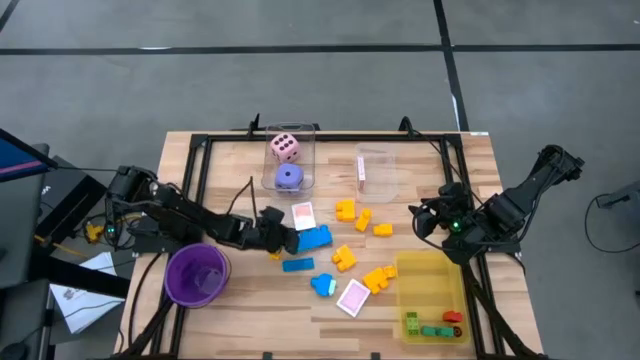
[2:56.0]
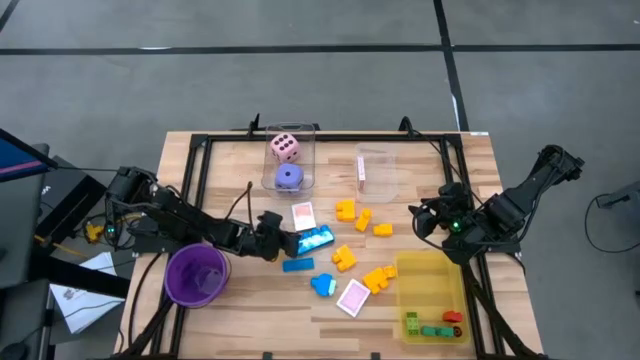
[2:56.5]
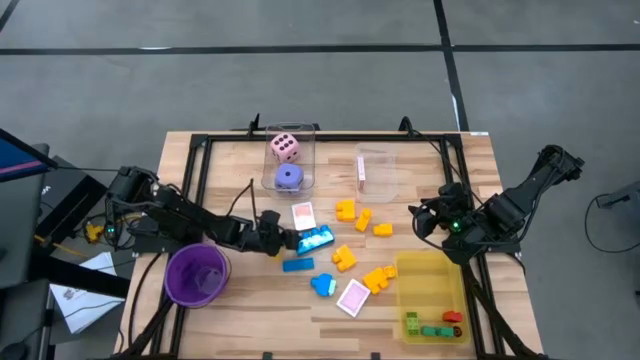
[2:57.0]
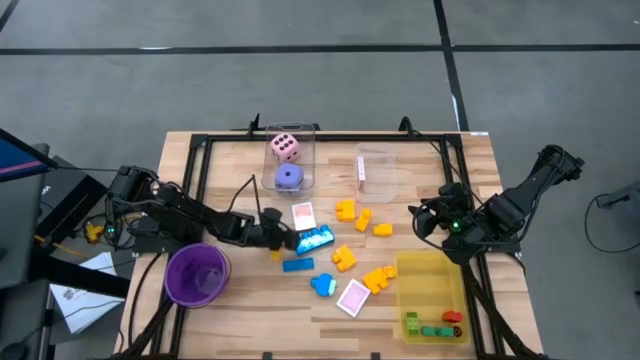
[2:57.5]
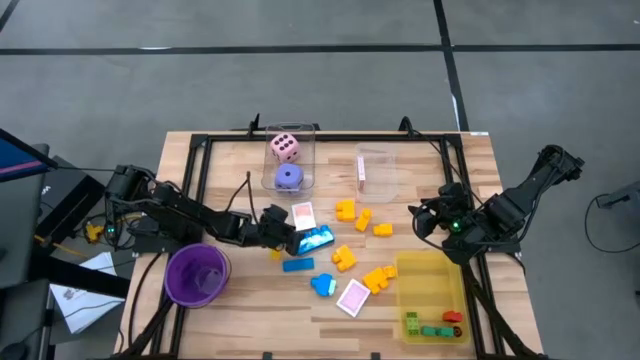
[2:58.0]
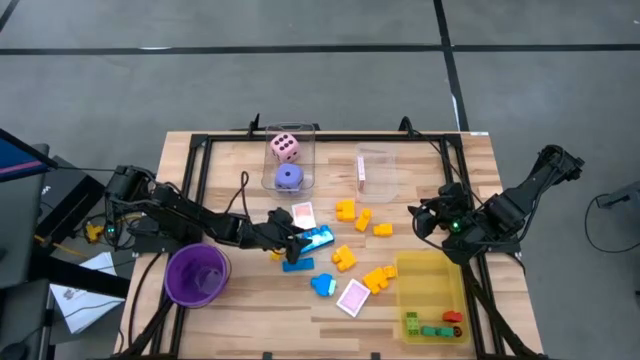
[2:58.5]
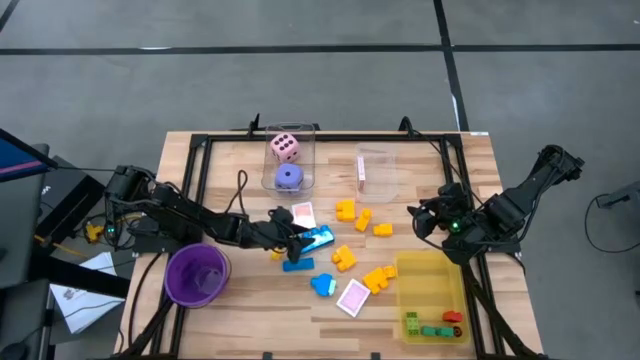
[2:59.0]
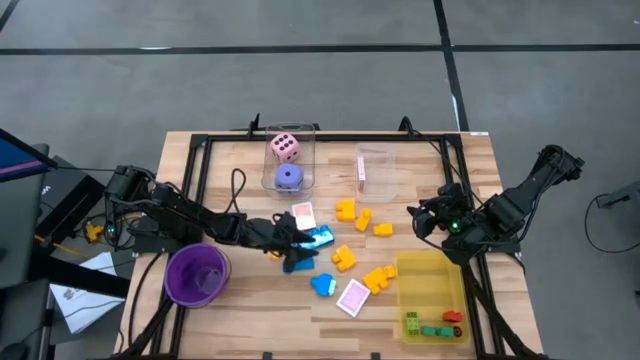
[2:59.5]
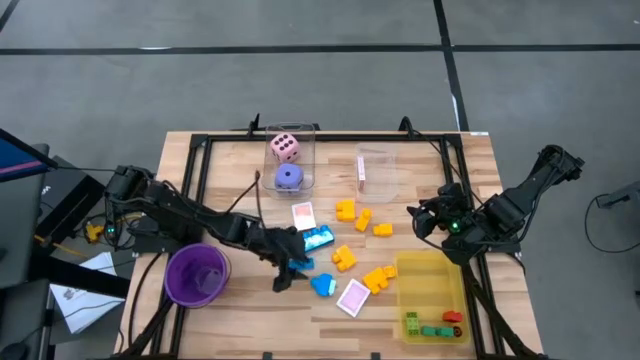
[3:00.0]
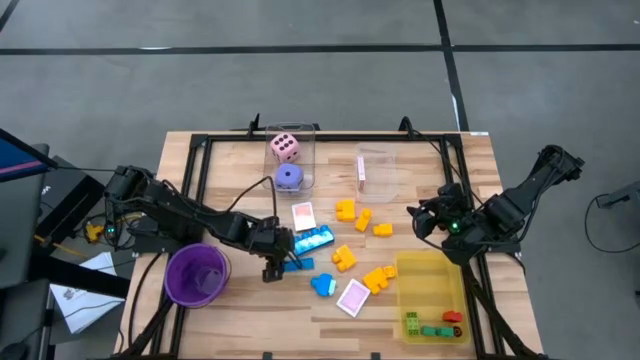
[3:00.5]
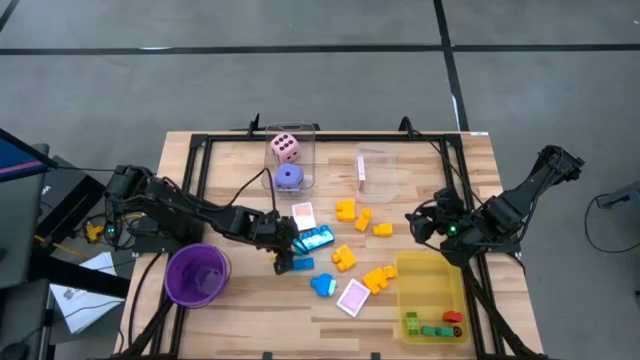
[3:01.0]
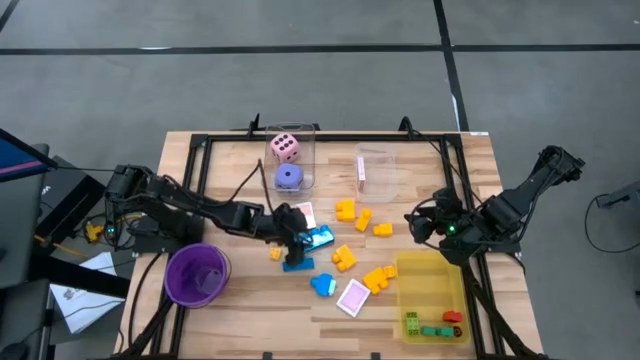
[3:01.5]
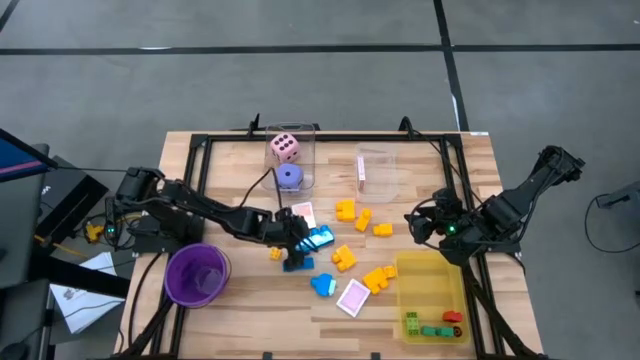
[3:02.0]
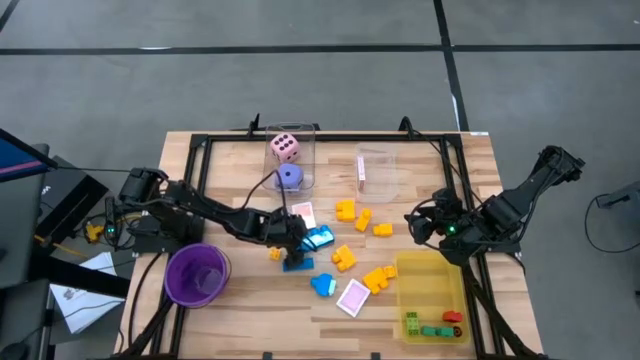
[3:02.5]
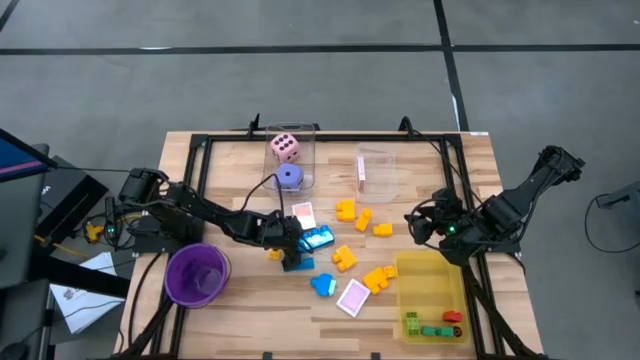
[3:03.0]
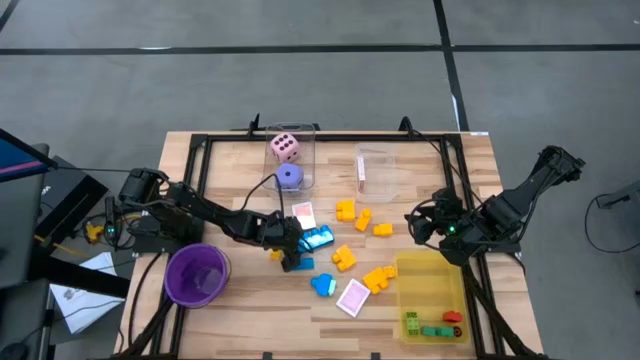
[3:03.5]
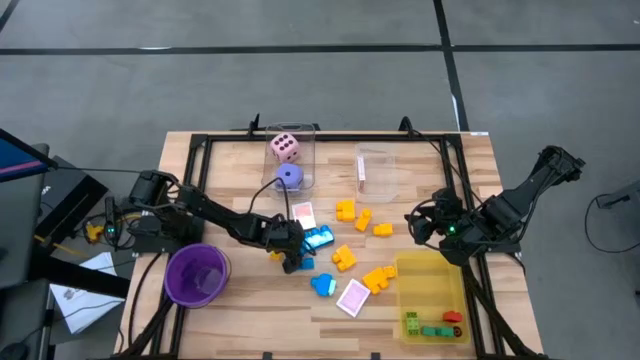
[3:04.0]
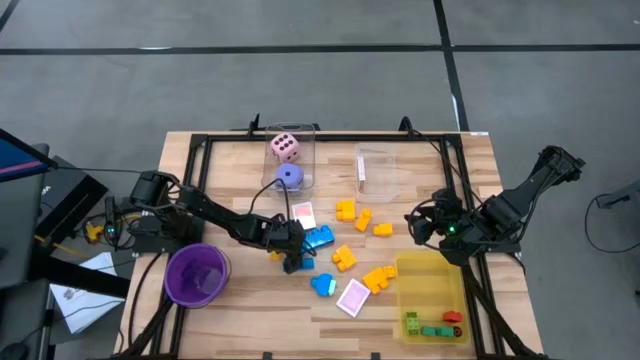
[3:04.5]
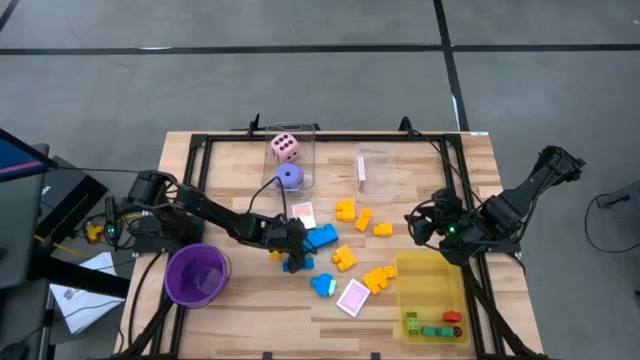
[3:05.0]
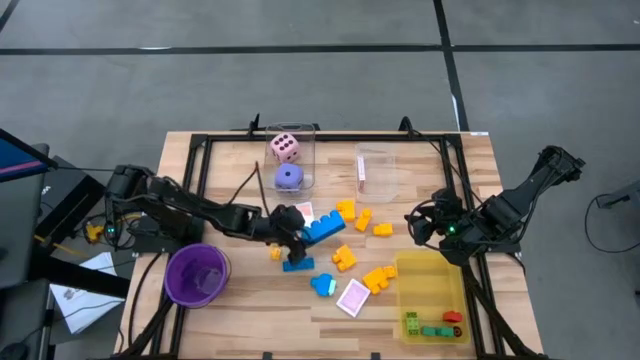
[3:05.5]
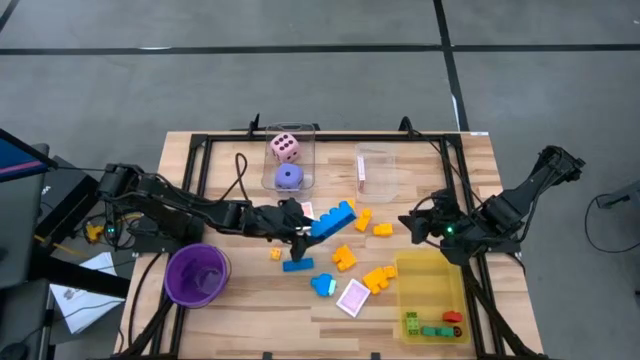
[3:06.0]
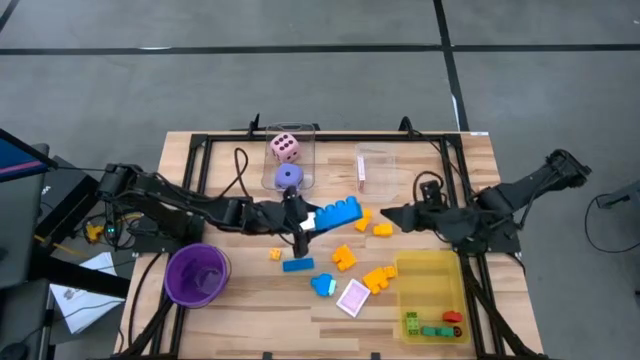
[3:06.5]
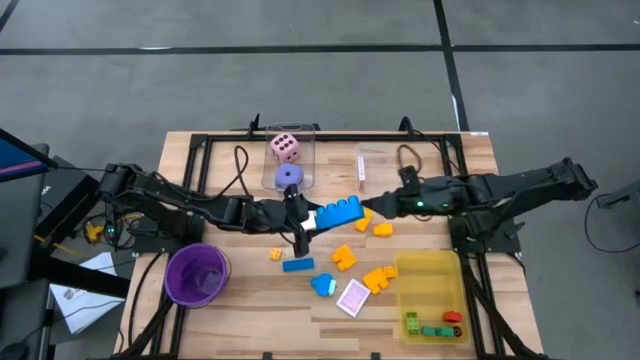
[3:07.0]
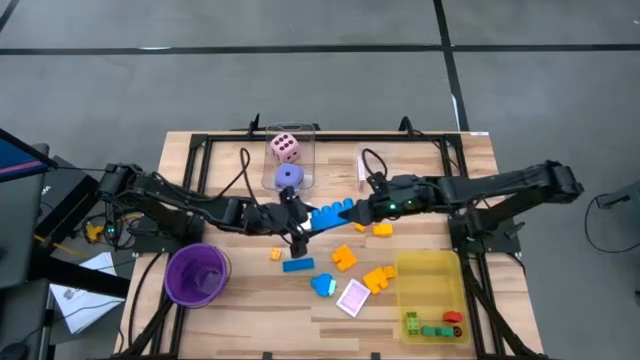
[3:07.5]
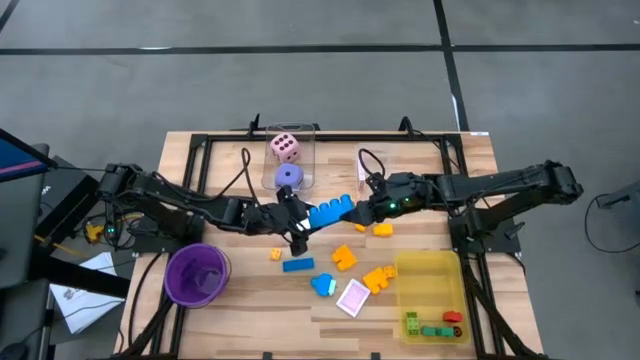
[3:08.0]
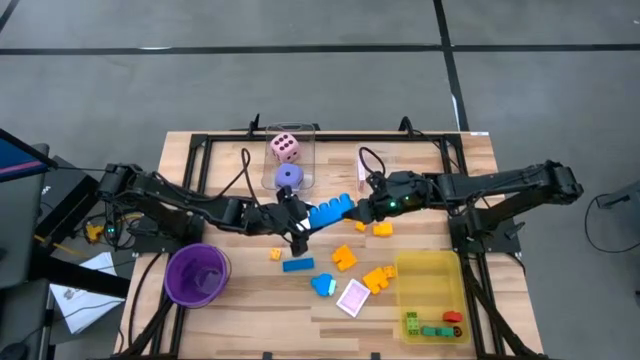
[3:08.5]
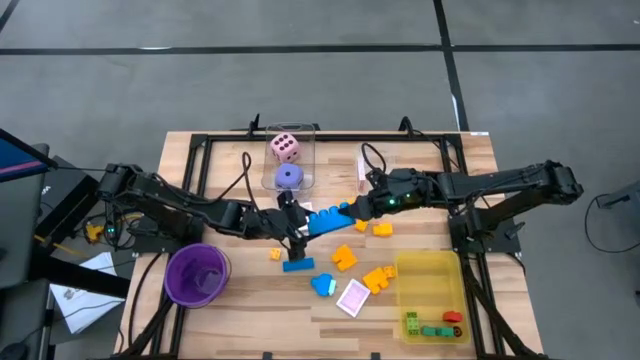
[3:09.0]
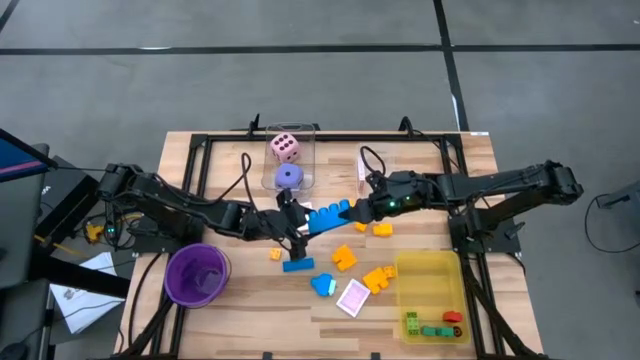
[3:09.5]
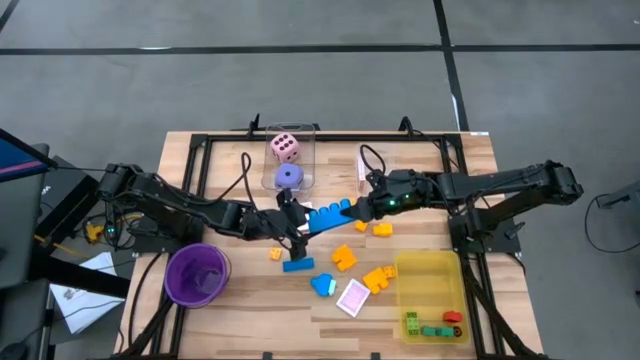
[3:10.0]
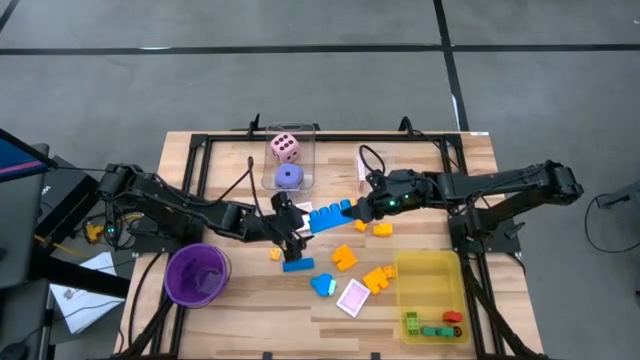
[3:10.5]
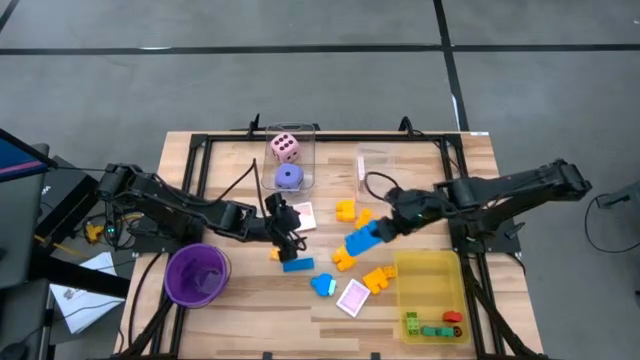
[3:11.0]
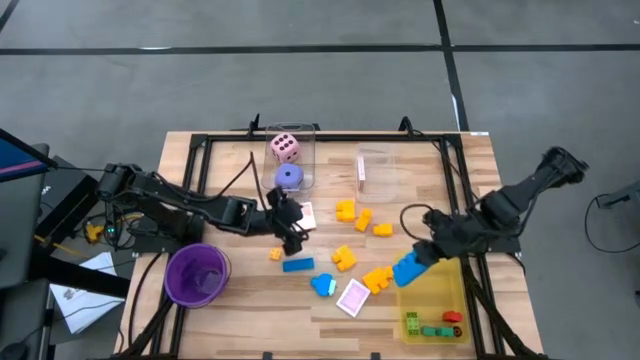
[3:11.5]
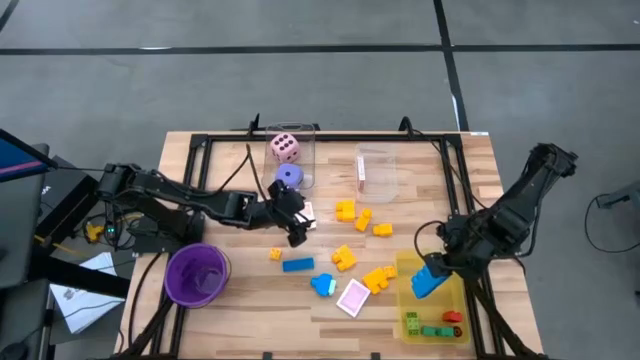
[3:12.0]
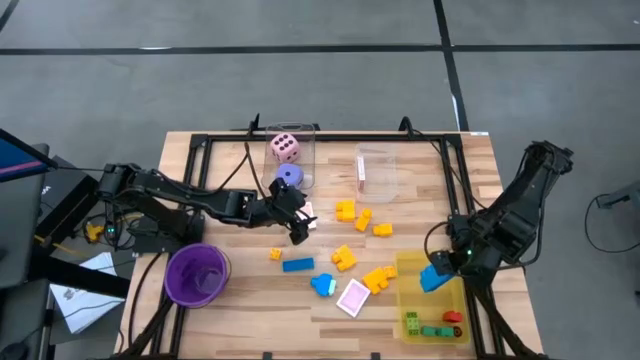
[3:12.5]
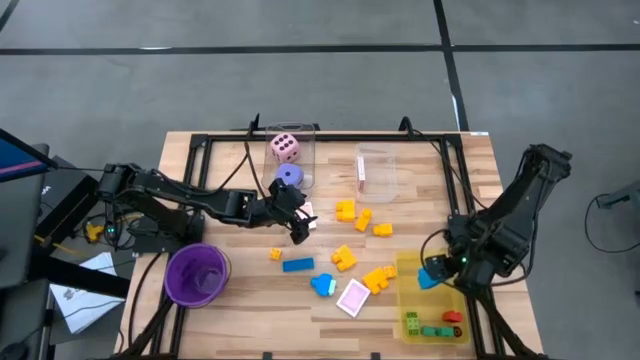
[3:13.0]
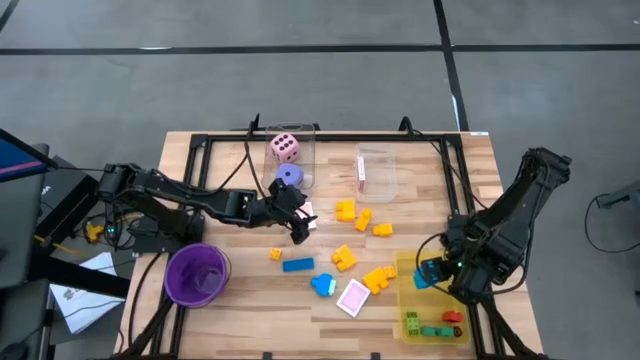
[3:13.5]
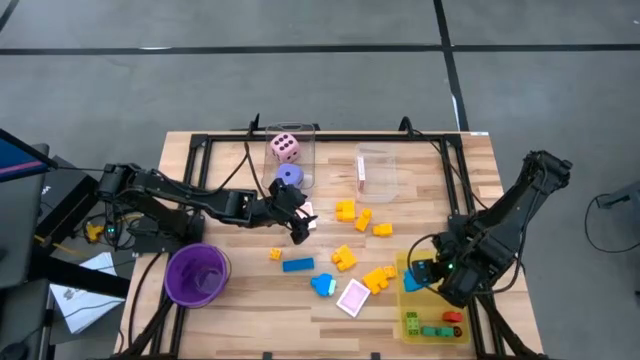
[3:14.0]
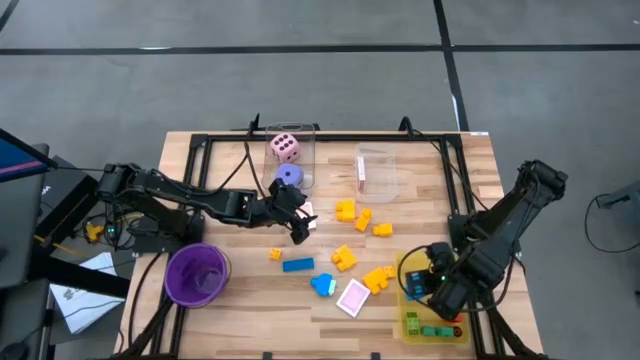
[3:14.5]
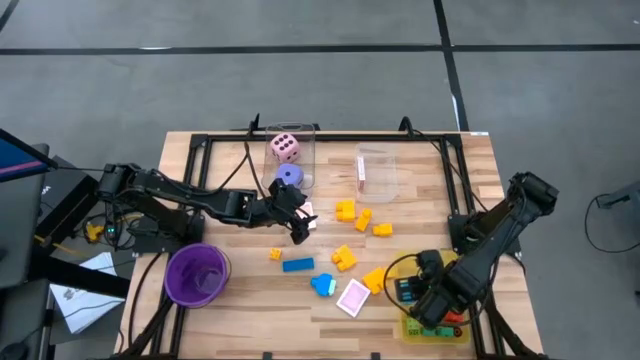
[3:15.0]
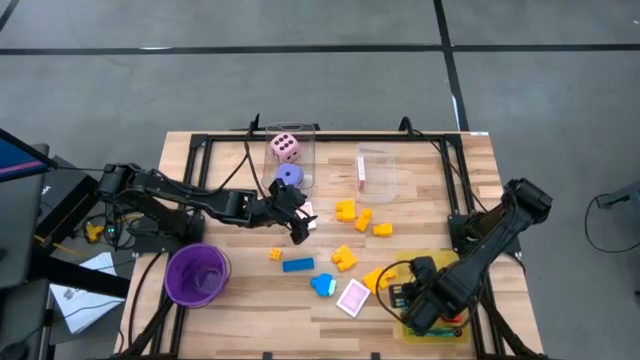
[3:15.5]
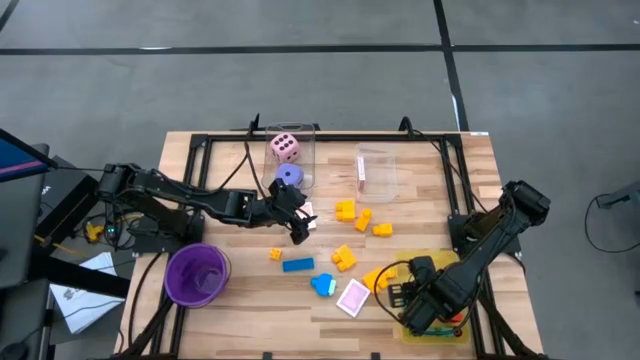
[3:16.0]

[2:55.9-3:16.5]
Task: Pick & Place Toys
Put the top blue game piece into the bin

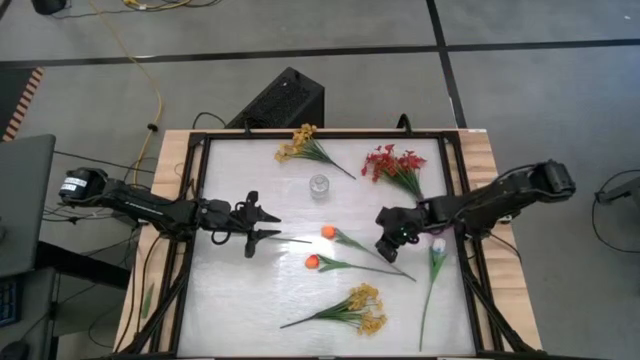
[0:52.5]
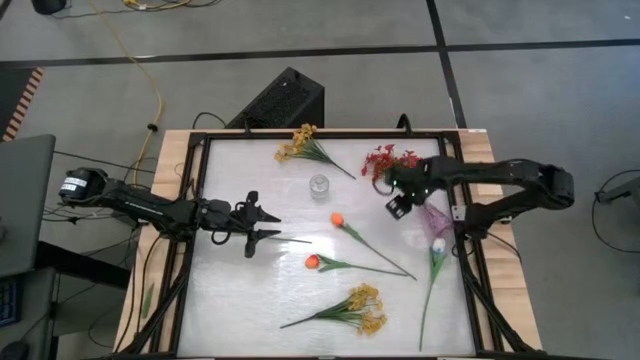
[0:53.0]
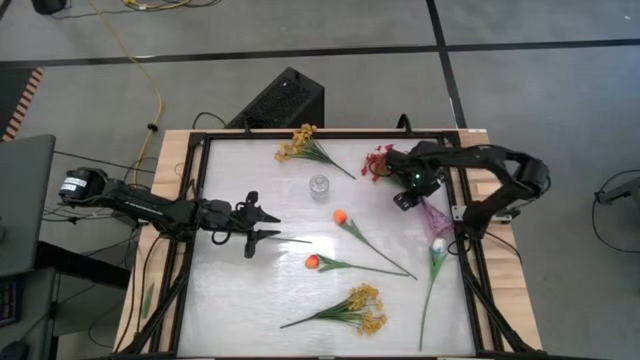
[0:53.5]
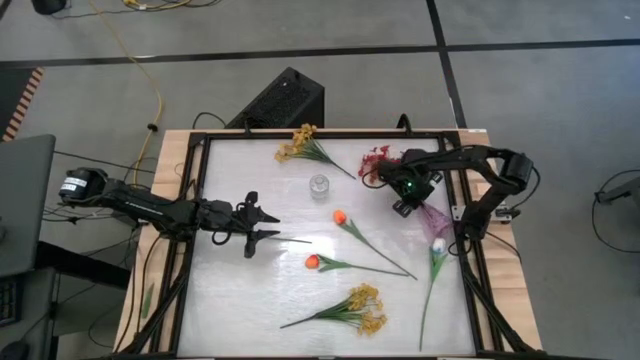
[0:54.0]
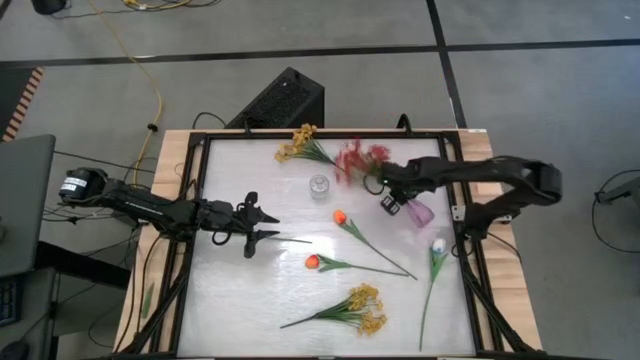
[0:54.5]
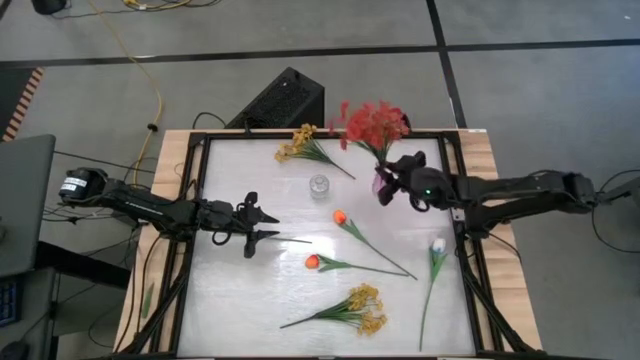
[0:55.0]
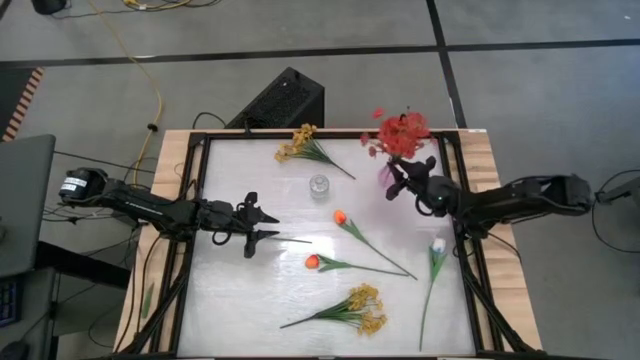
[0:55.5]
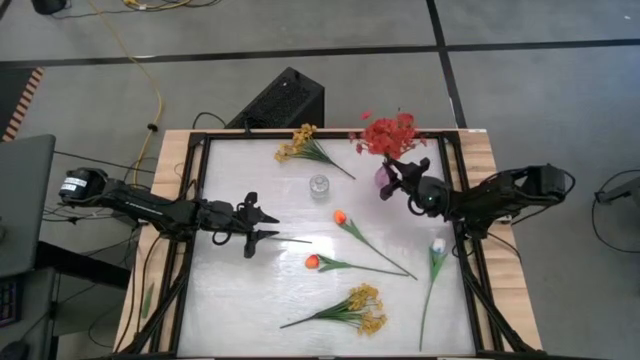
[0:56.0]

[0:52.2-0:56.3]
Task: Sort flowers into vase by color
Put the pink flower vase on the top right of the table upright
